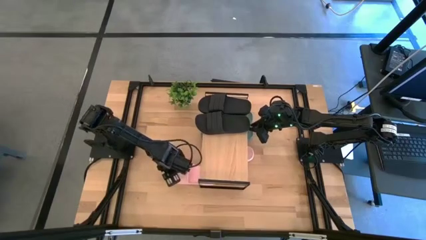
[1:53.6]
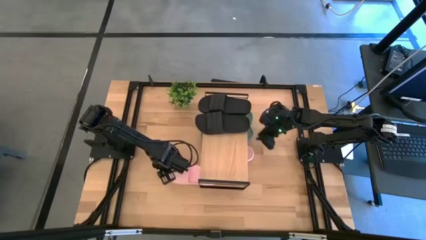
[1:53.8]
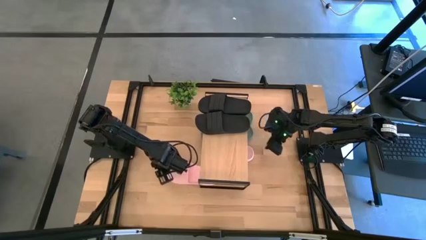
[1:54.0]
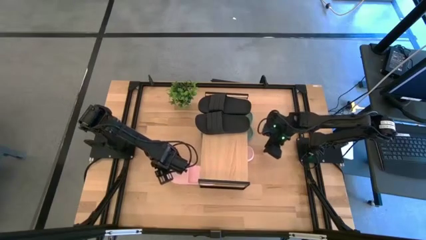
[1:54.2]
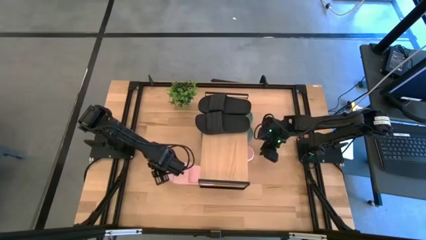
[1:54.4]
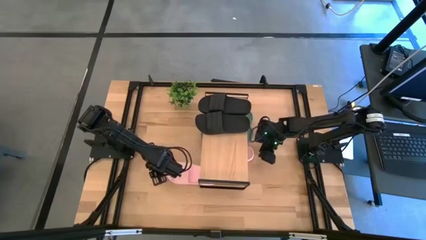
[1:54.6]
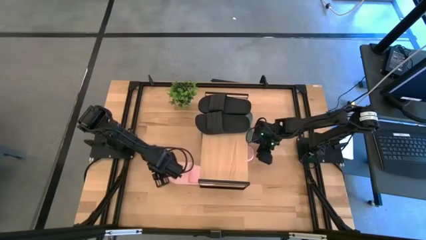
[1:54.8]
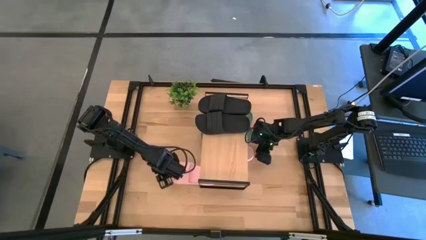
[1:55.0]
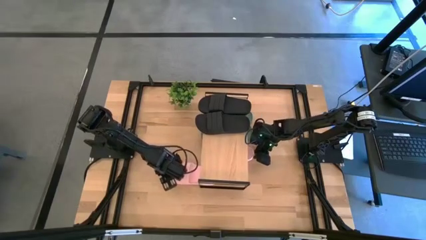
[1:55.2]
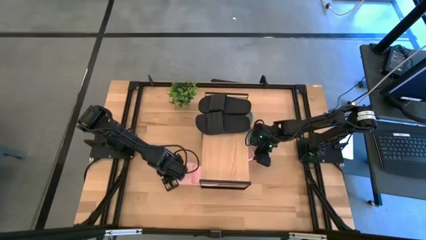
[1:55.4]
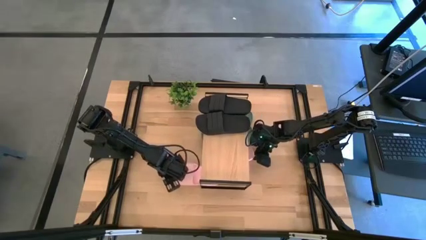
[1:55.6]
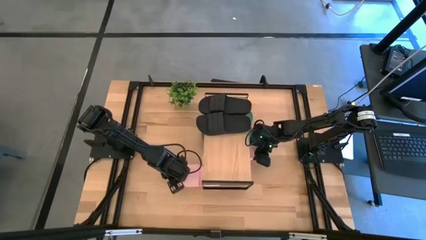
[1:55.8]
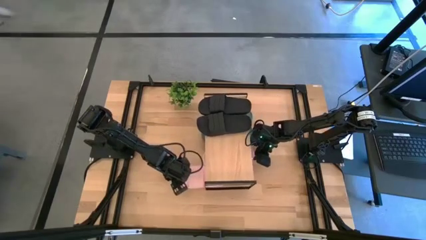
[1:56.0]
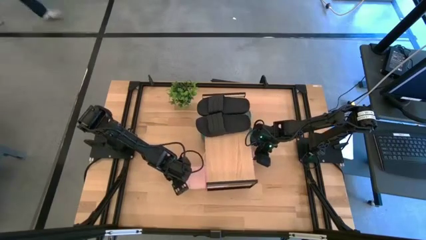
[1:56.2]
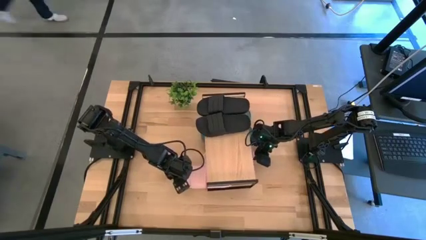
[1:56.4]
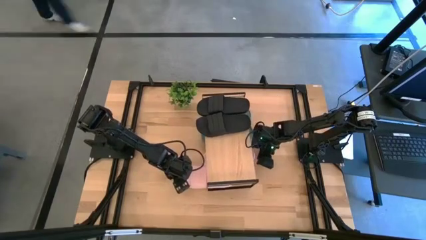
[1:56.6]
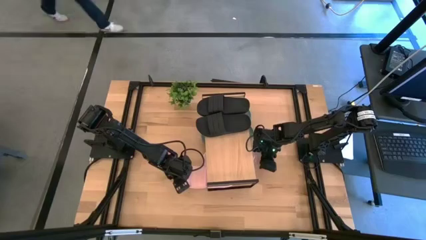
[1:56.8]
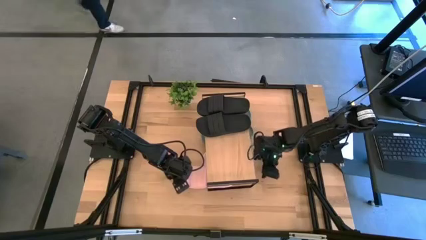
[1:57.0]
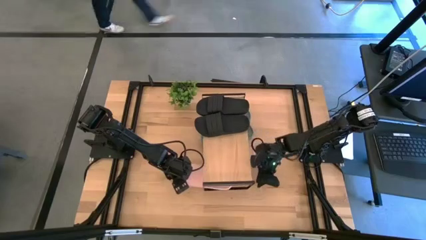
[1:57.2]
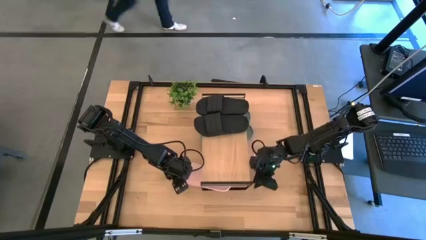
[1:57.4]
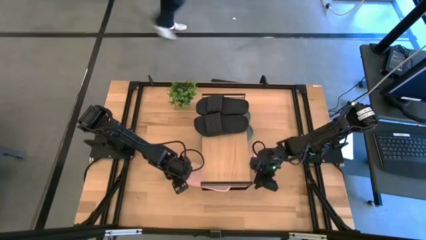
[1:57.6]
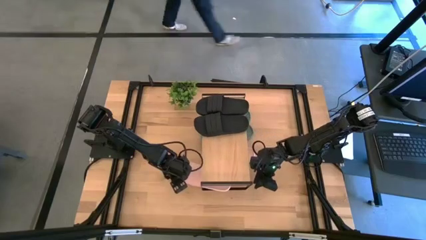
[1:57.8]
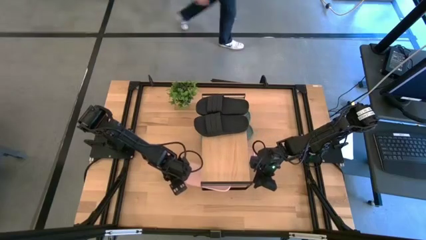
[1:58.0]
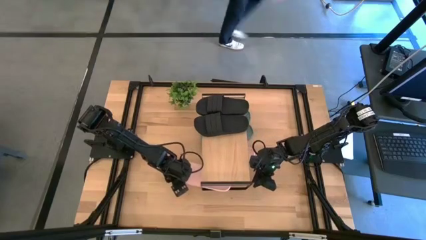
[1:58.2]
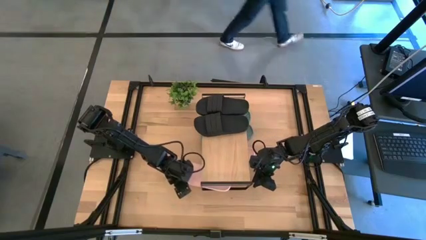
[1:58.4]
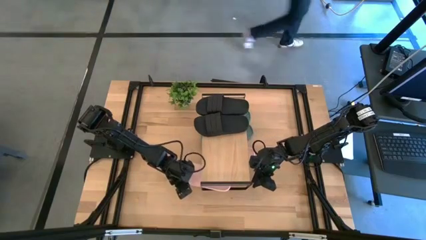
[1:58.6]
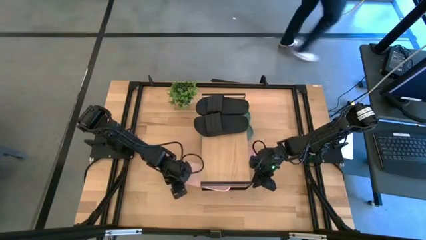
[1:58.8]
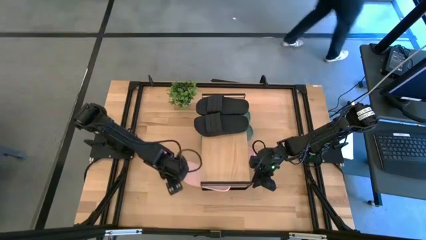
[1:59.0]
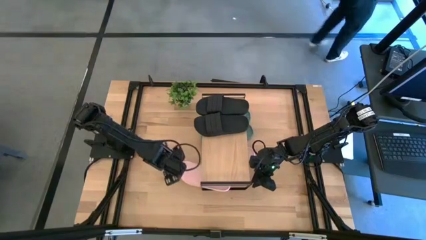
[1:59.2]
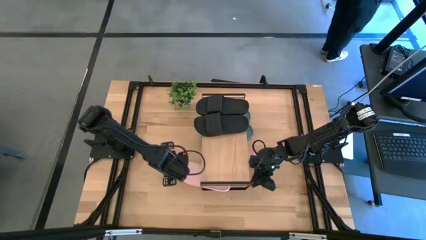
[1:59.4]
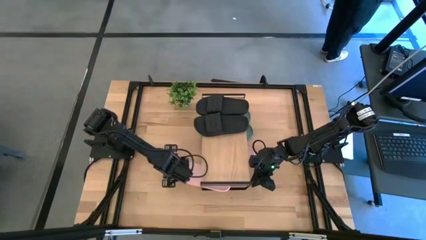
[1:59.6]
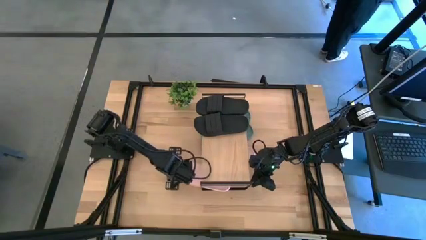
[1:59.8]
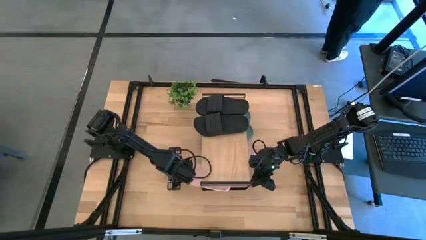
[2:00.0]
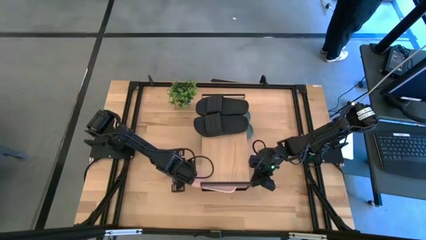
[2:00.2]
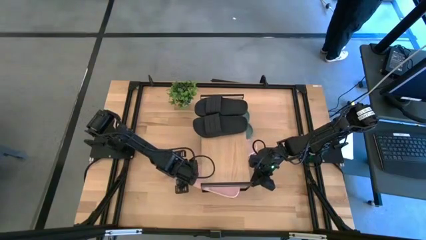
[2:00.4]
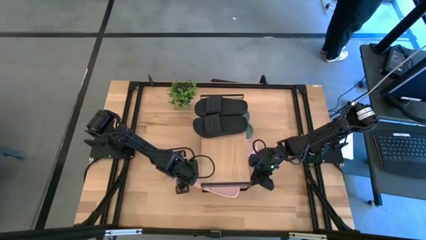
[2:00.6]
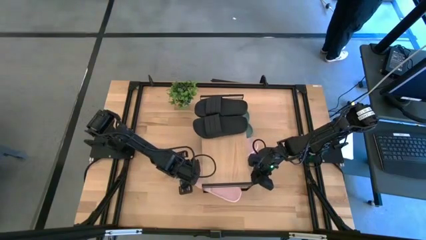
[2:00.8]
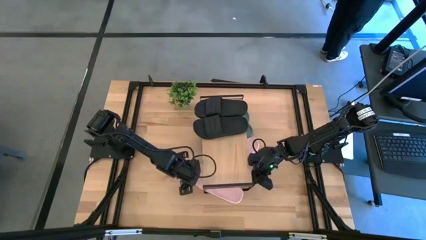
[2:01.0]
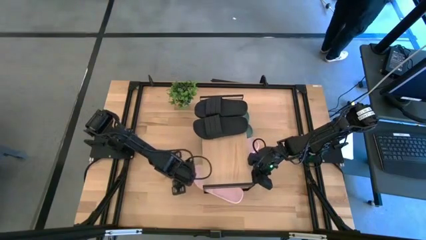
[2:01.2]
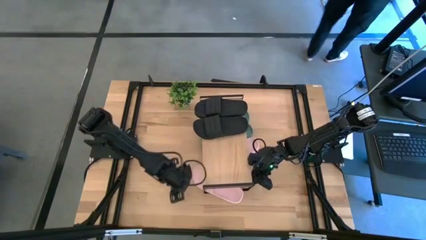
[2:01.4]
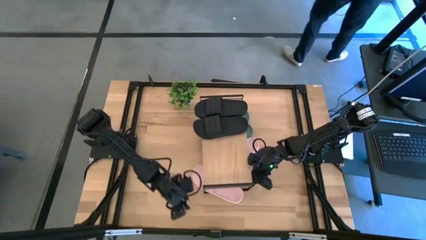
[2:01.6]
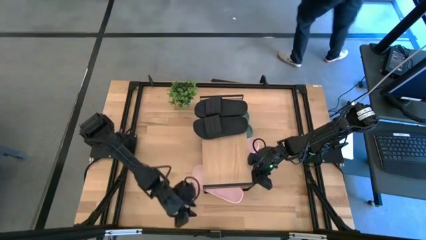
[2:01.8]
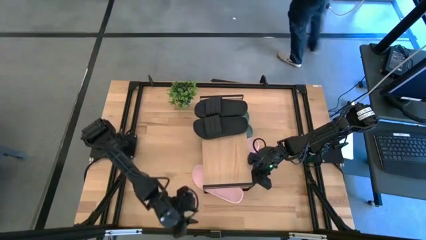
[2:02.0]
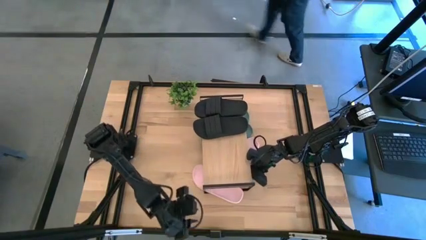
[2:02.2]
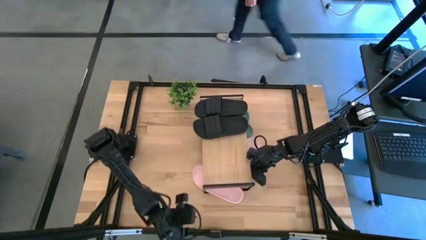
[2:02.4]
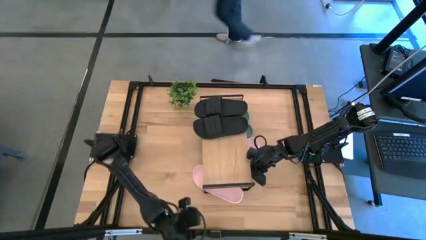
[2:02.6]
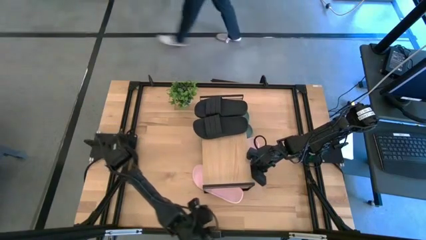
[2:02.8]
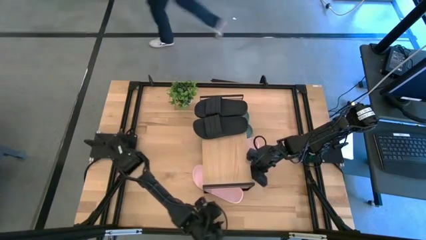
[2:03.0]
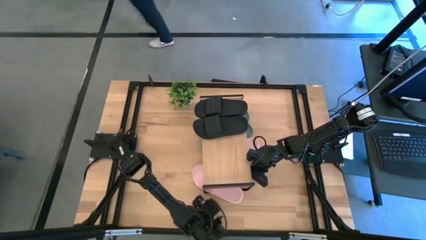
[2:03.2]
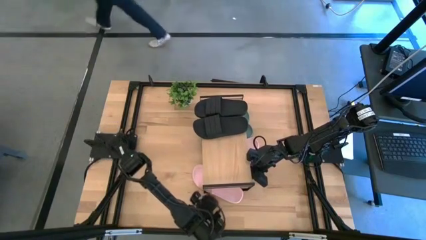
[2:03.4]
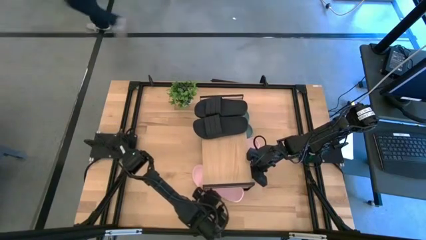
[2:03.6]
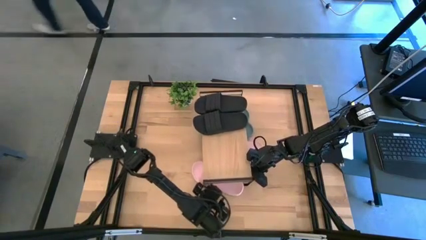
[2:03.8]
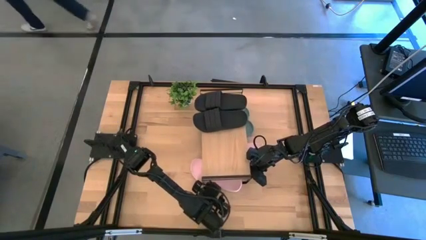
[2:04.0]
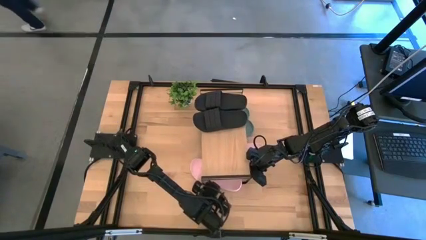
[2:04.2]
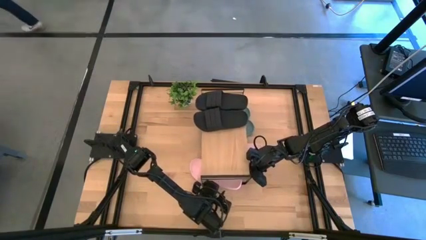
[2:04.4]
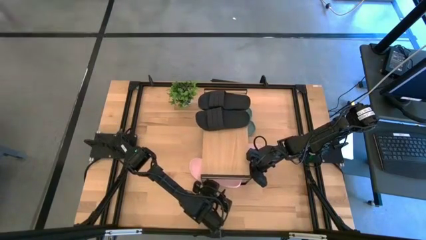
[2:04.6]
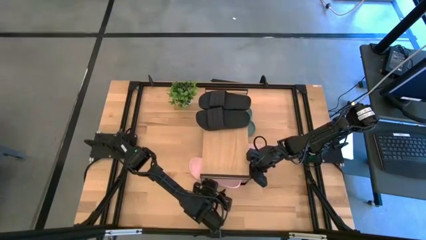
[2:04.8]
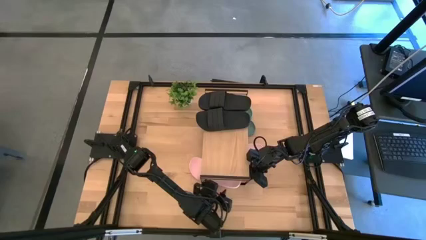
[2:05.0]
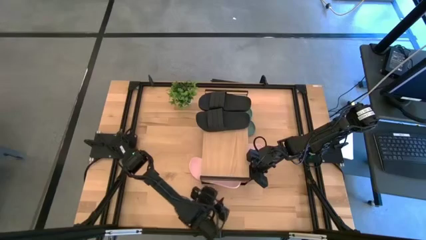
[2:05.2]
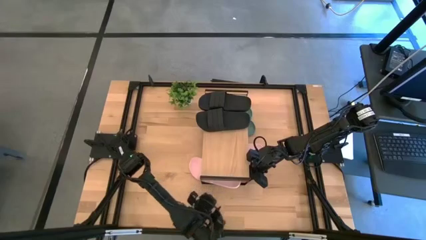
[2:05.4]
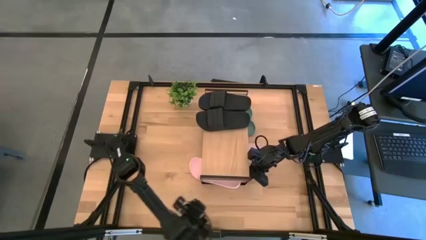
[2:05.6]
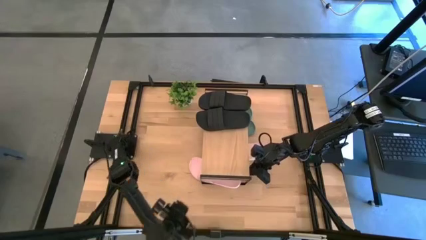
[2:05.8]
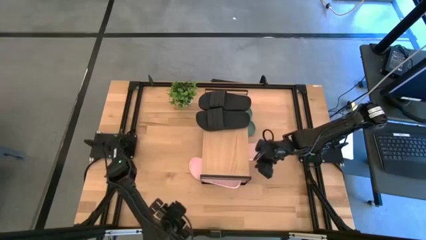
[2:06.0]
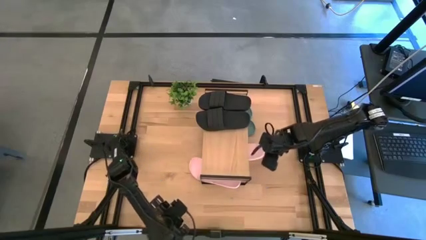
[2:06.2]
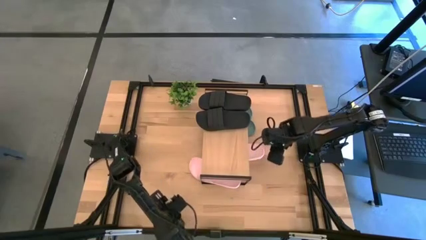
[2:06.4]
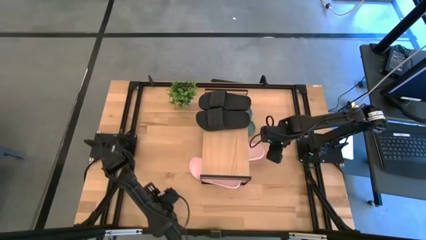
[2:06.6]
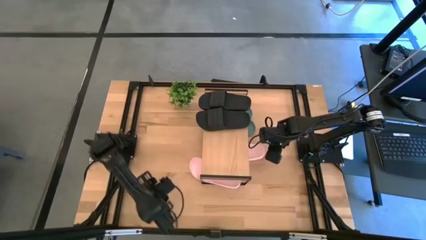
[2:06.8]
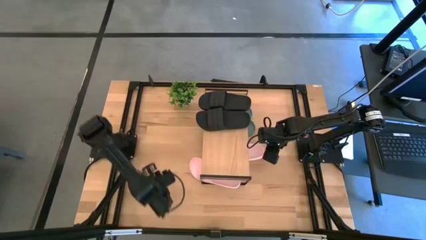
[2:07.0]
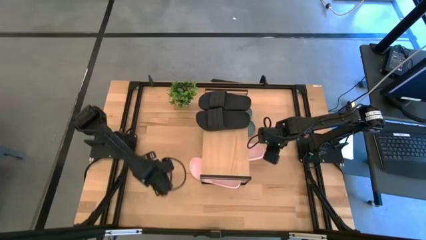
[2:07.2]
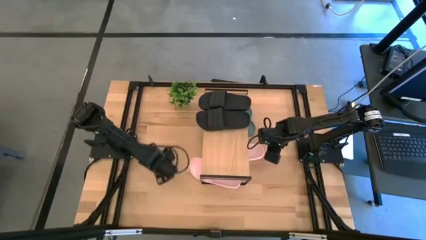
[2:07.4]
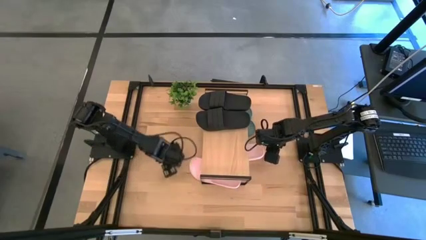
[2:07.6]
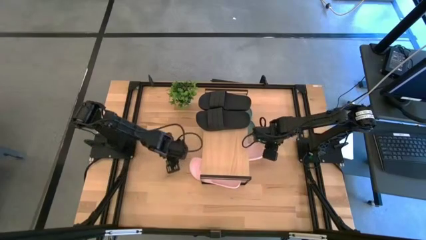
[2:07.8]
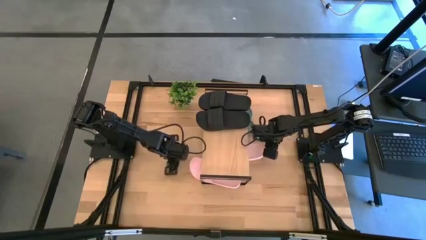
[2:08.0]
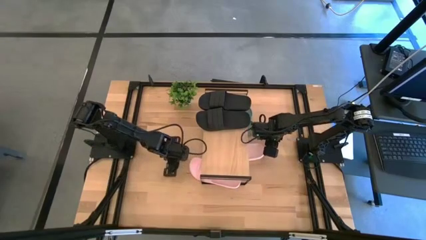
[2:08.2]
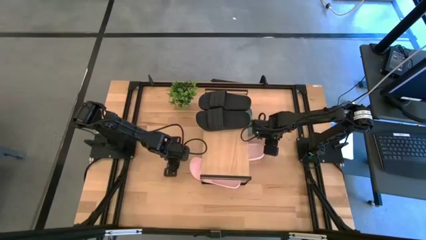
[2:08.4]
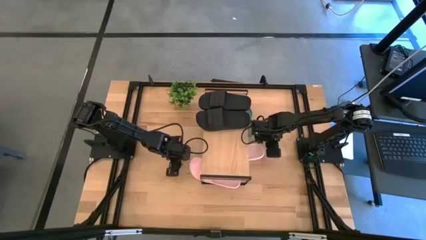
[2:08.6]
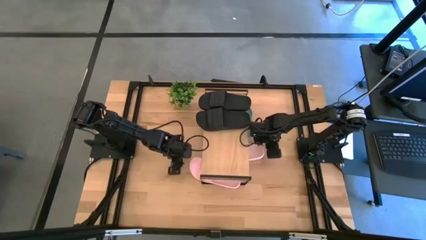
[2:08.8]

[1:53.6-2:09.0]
Task: Pick and place slides into the shelf
Put the pink slide under the shelf
